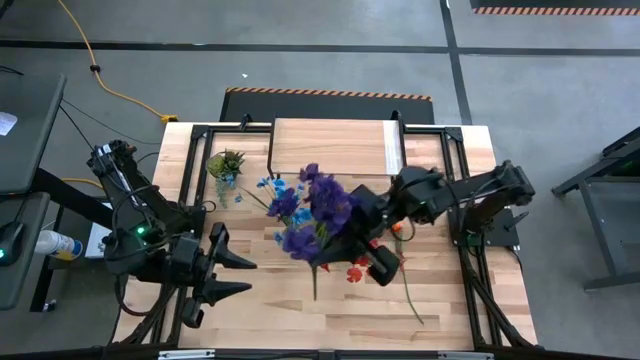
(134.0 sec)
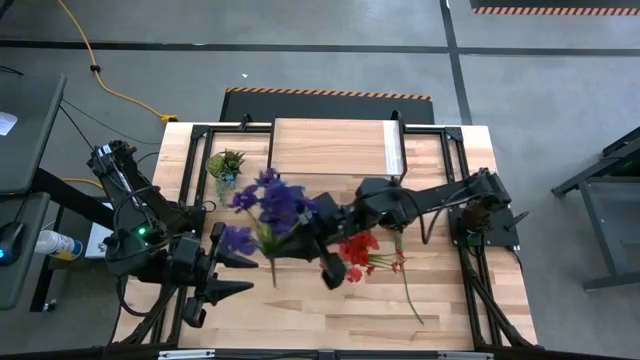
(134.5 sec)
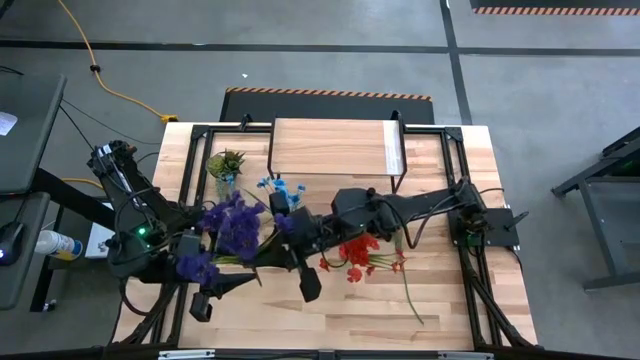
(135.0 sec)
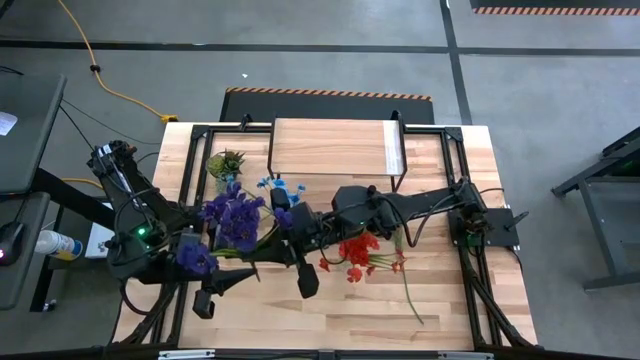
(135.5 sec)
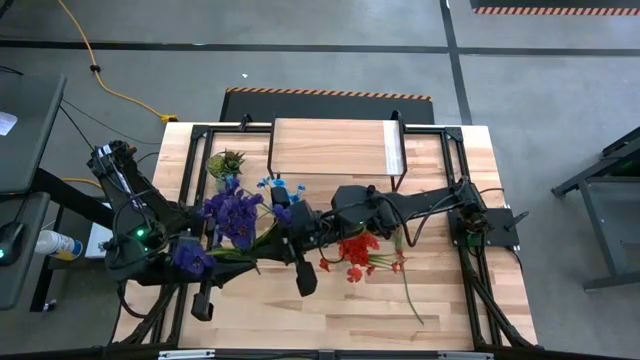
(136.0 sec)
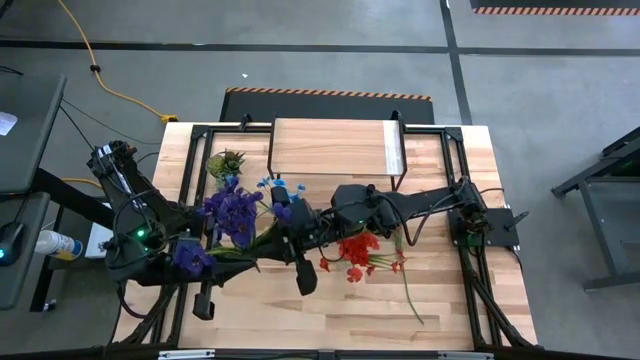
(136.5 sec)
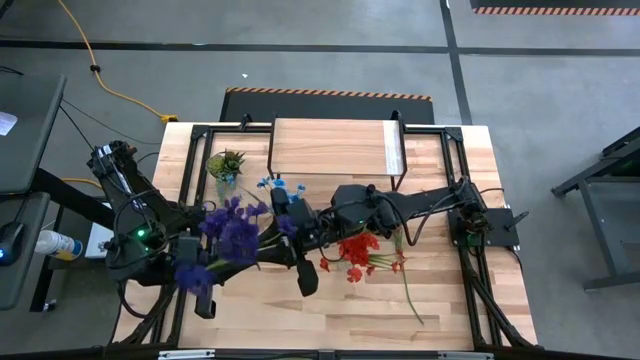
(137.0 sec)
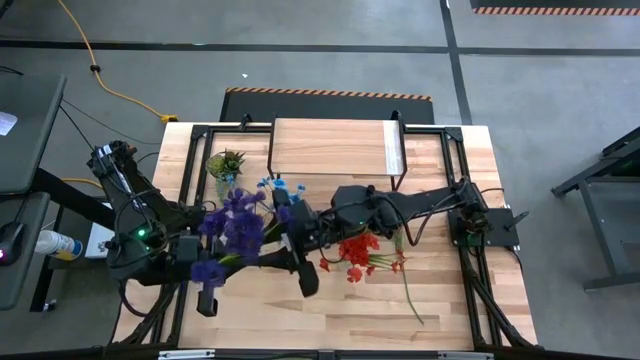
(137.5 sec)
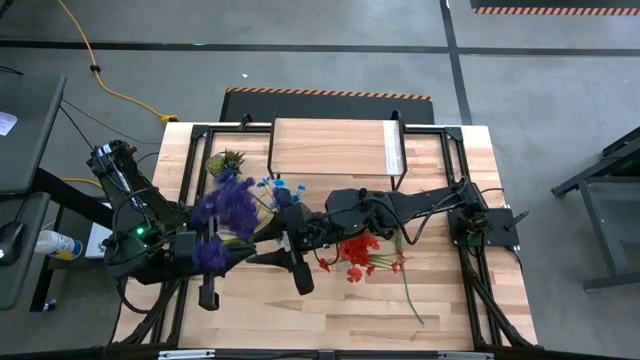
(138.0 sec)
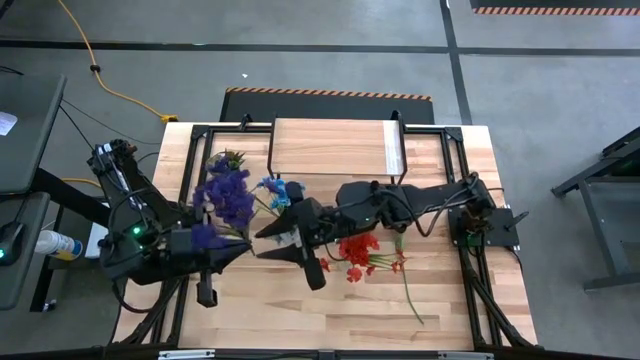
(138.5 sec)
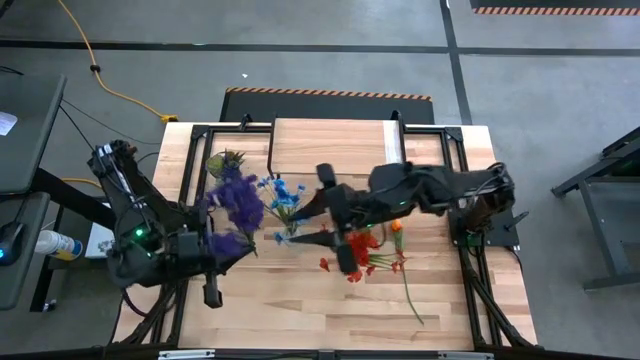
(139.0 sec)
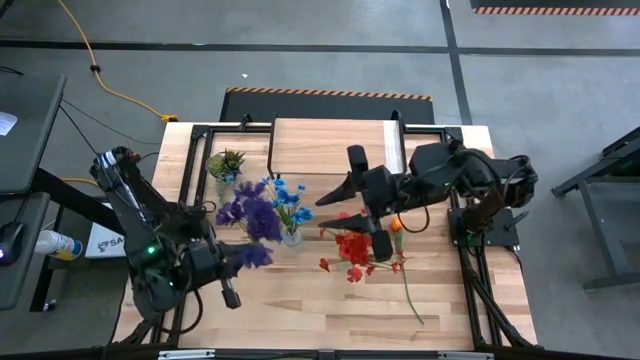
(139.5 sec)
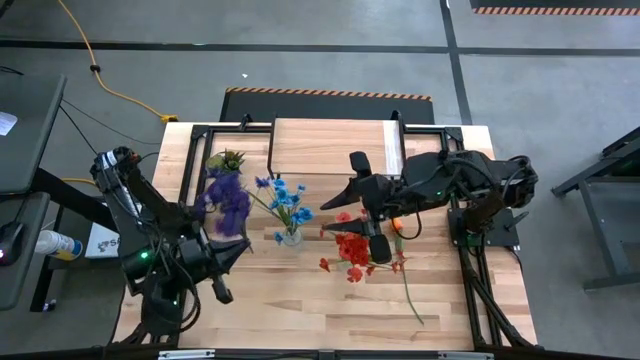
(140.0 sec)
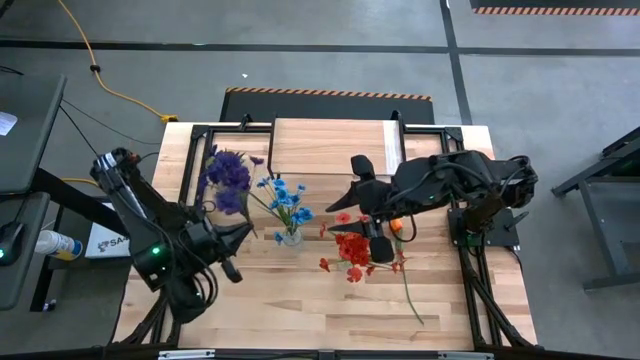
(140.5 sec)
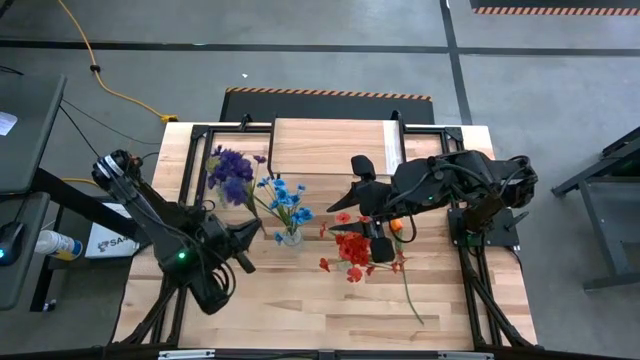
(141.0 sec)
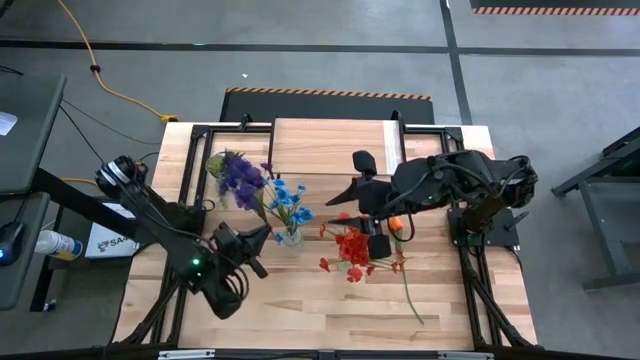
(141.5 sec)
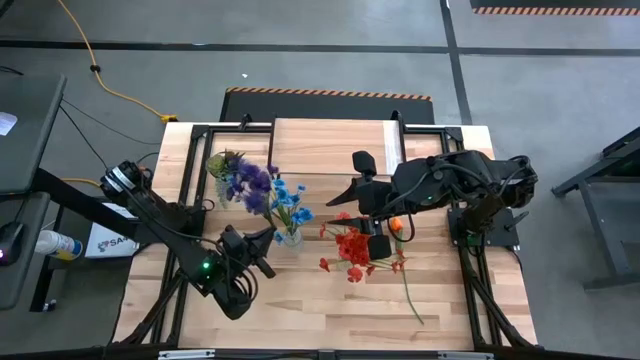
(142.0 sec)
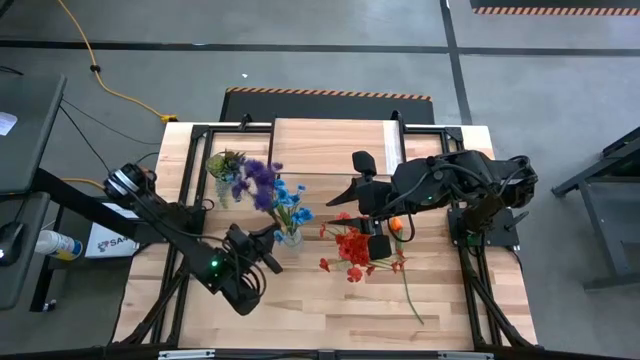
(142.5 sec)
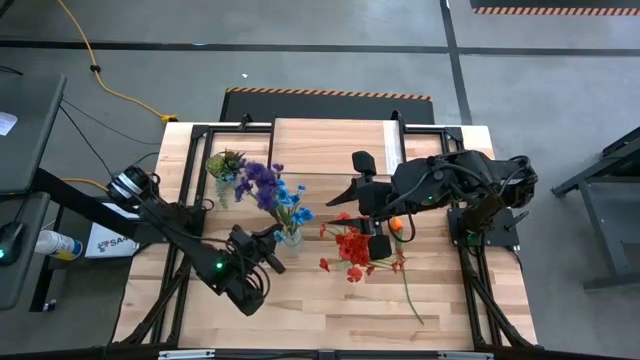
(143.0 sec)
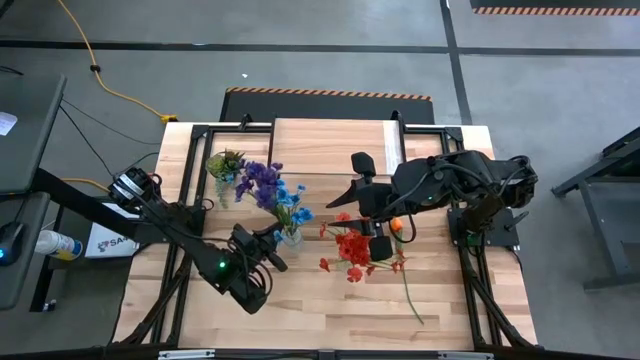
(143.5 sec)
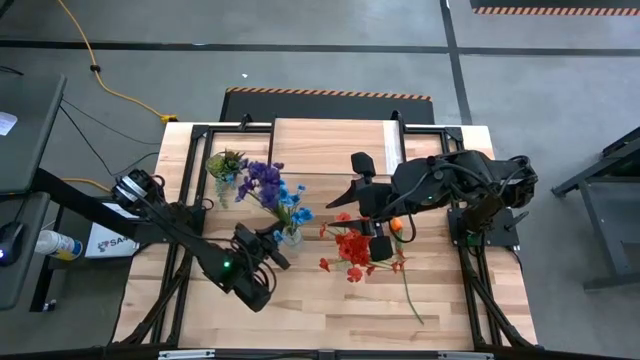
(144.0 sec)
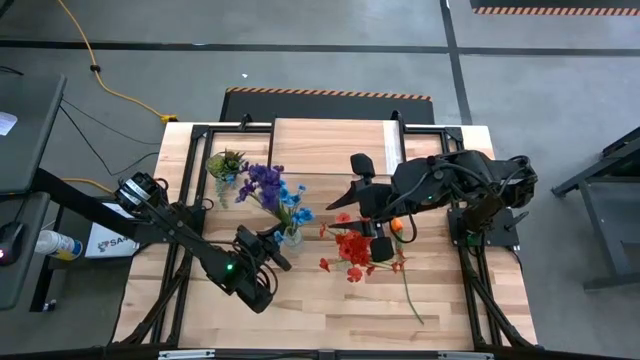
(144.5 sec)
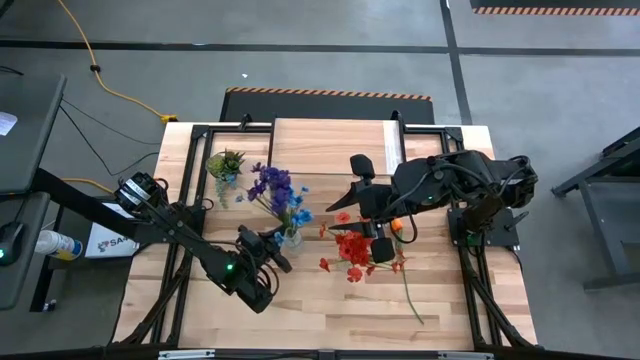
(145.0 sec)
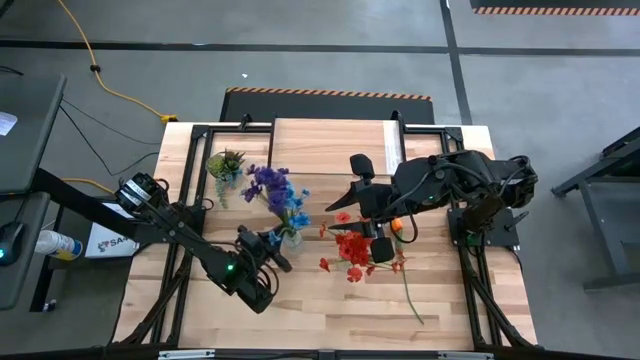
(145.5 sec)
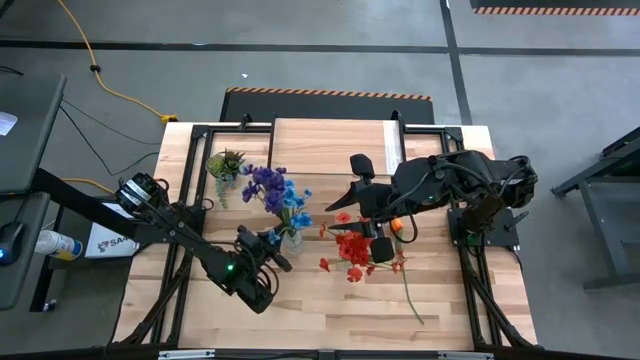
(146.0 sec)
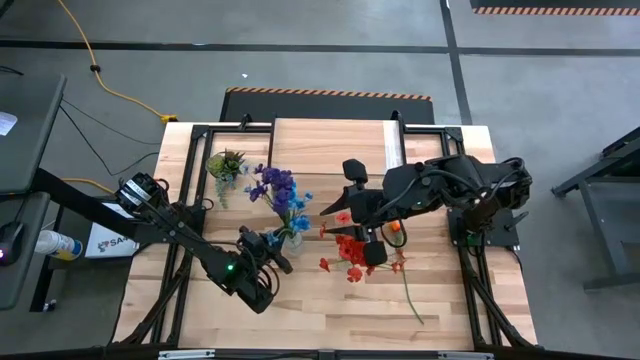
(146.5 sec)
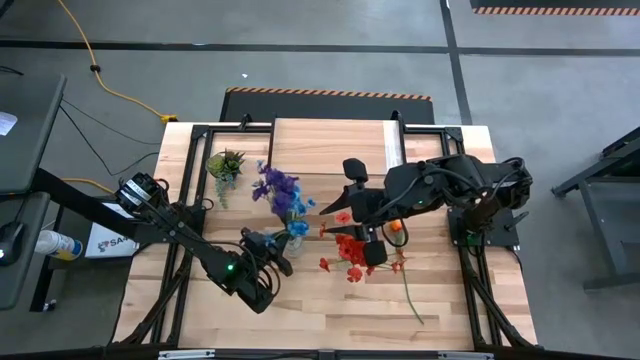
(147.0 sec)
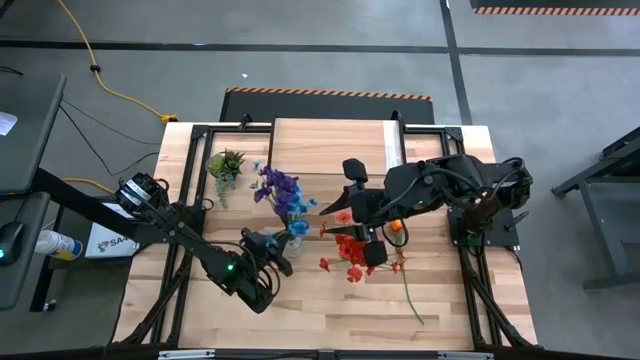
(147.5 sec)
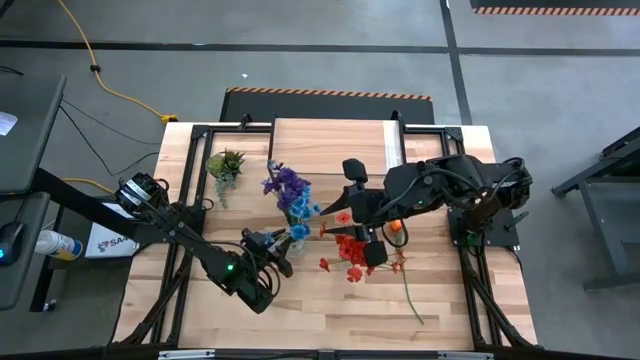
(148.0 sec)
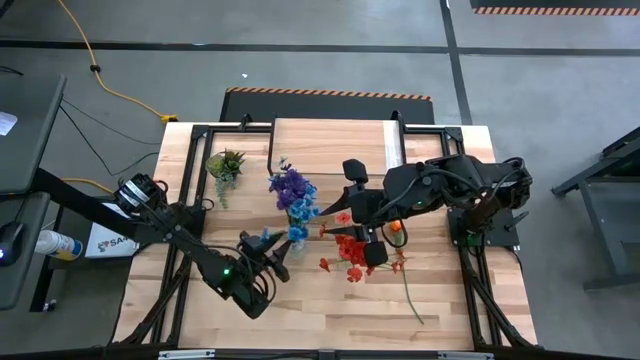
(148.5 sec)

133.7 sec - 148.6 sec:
Task: Pick and place flowers into a vace then onto a shelf
Put the purple flowers into the left transparent vase

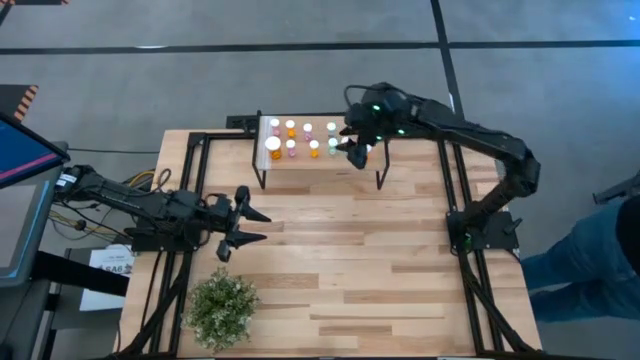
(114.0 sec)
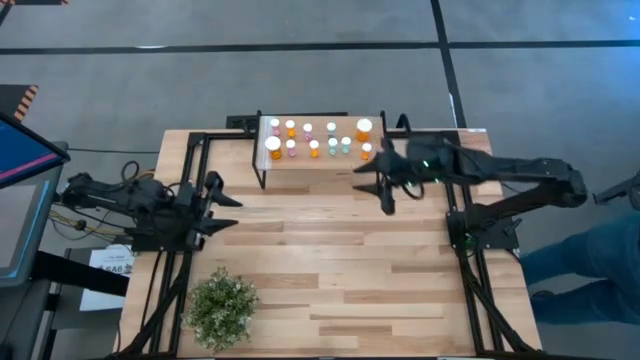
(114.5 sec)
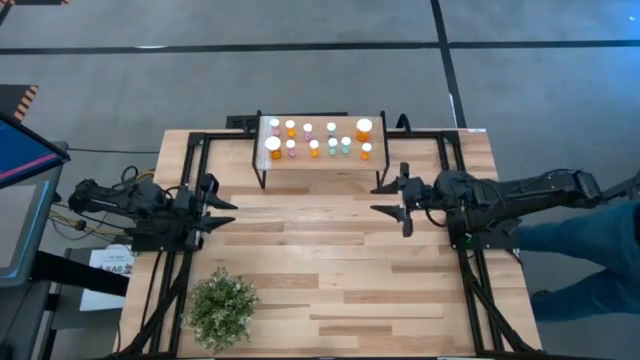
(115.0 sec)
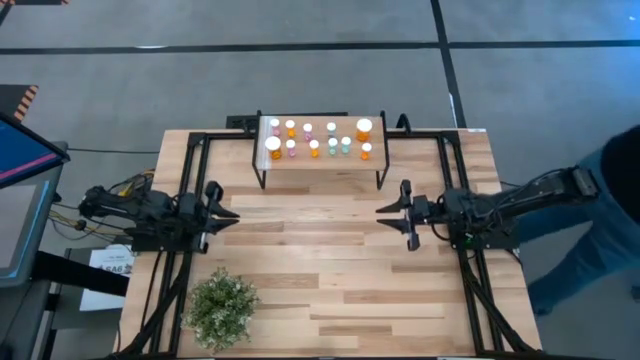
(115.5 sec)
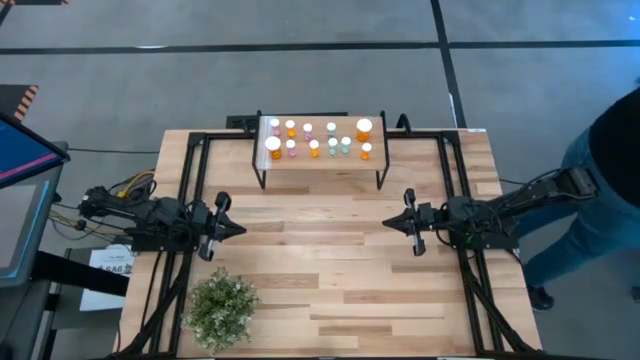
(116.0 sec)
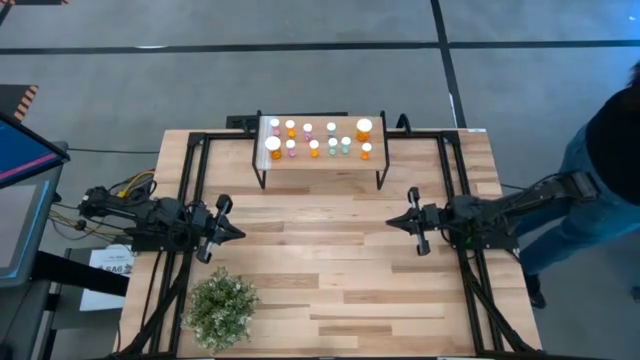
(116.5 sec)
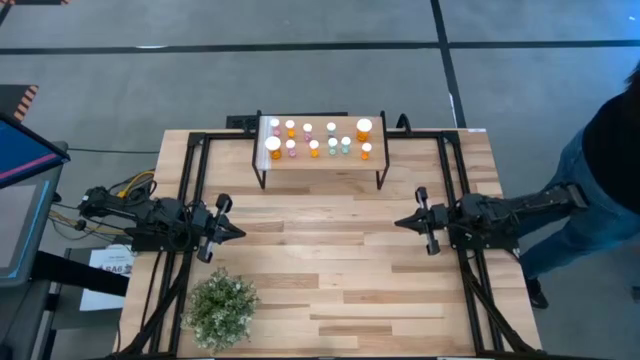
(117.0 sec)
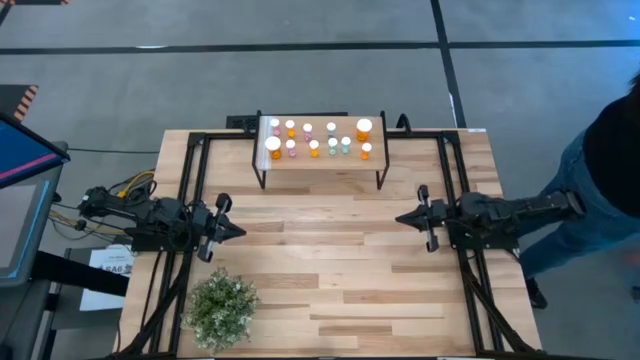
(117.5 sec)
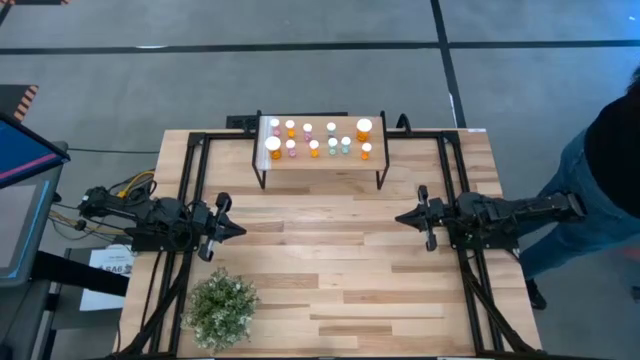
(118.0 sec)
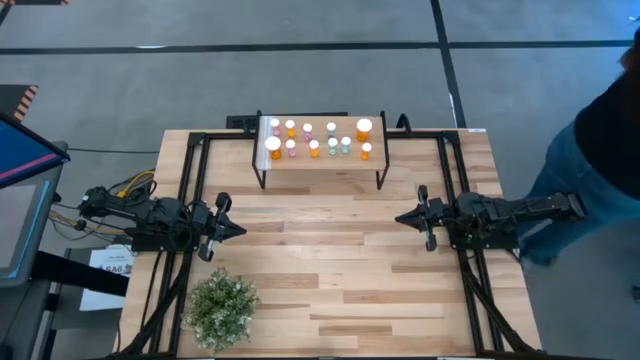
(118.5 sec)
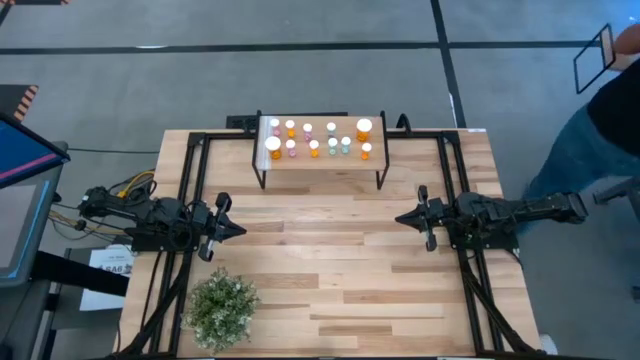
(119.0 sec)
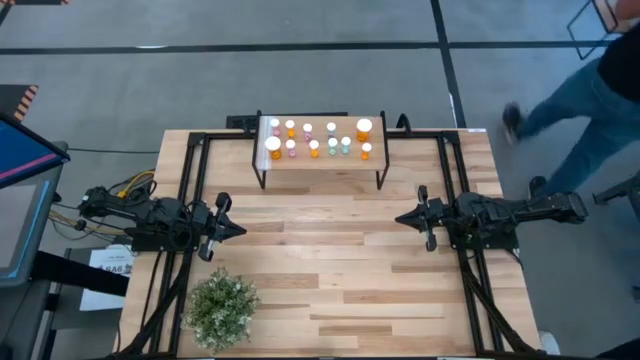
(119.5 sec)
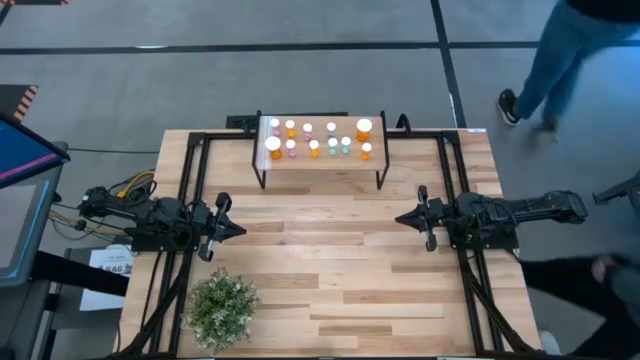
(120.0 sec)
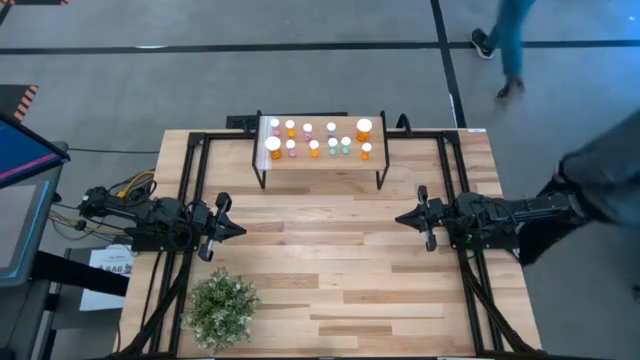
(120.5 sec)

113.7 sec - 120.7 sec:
Task: Pick and place medicine bottles onto shelf by color
Return to Home Position
